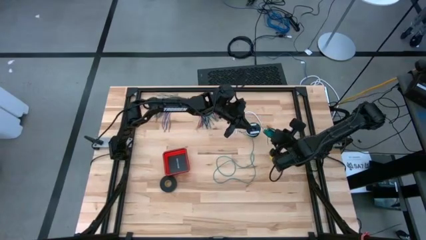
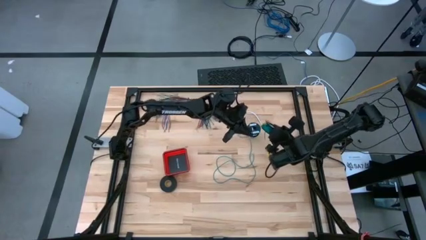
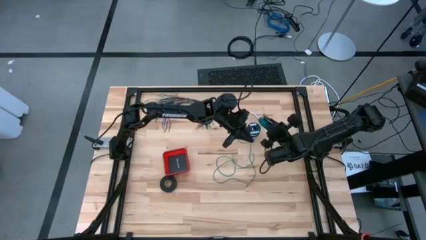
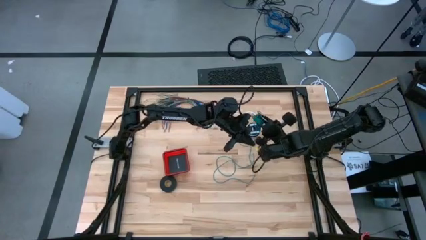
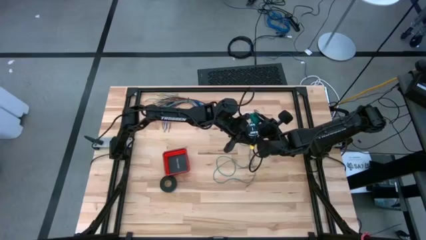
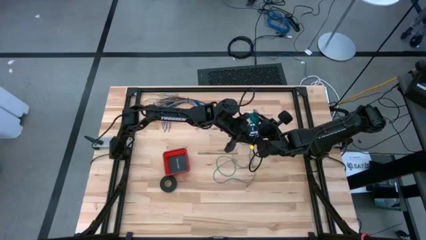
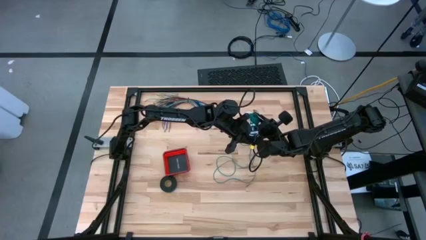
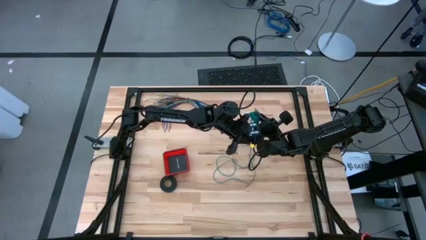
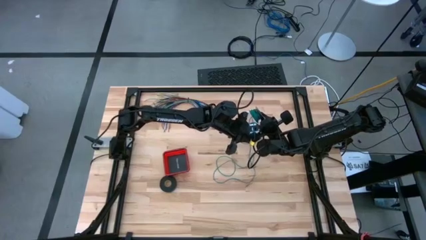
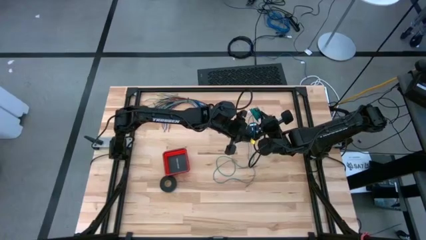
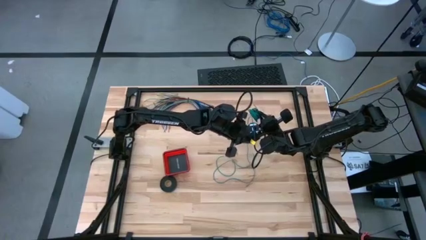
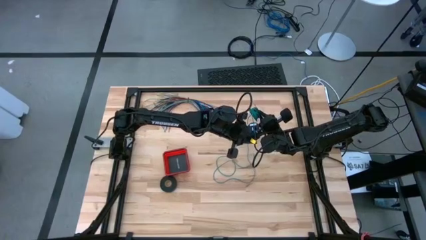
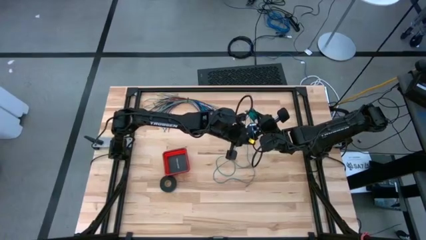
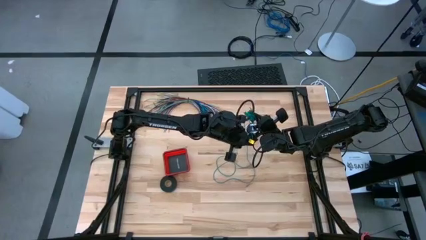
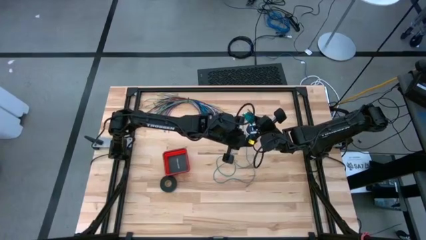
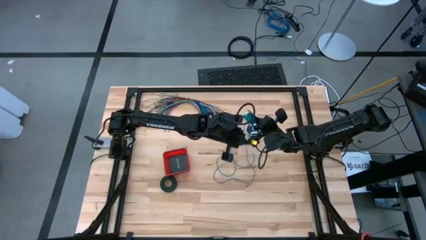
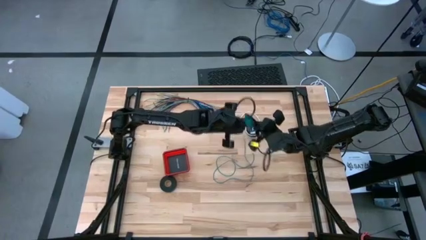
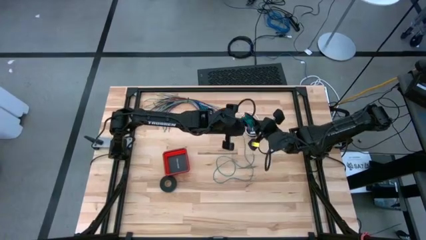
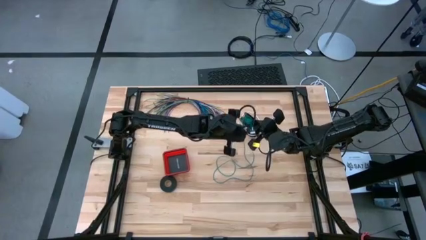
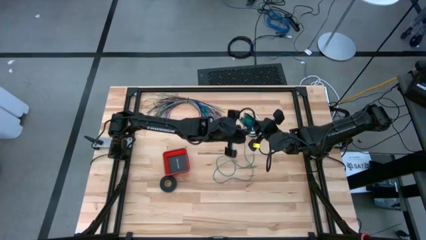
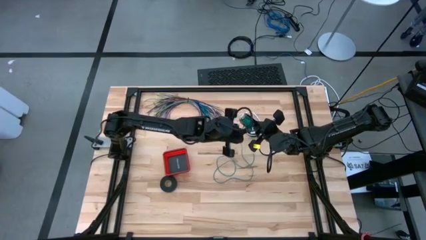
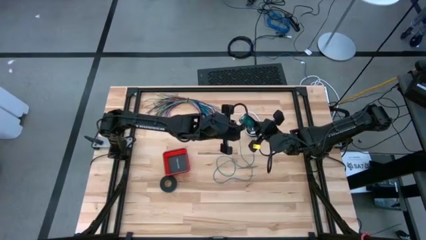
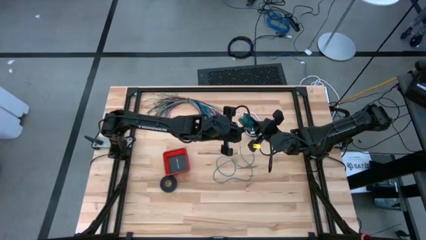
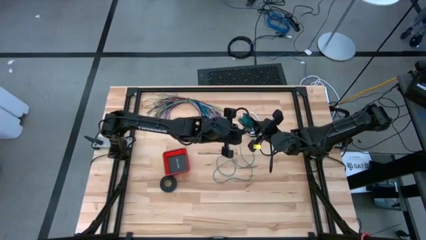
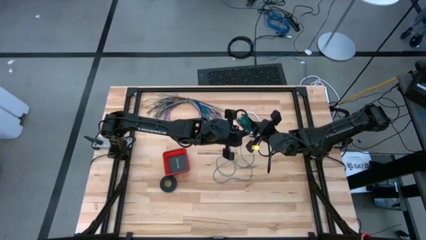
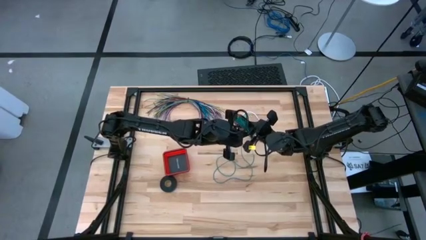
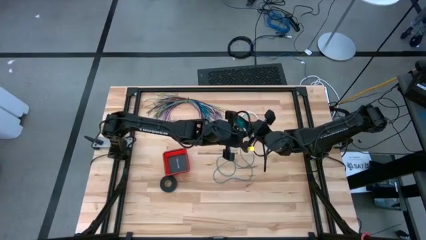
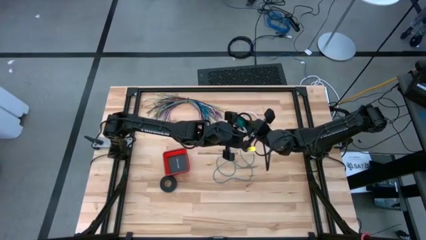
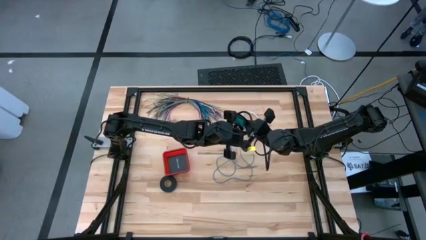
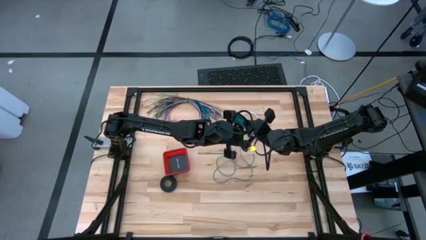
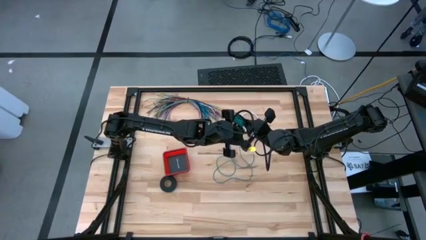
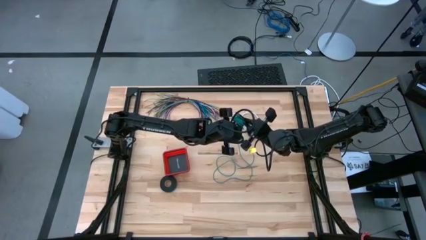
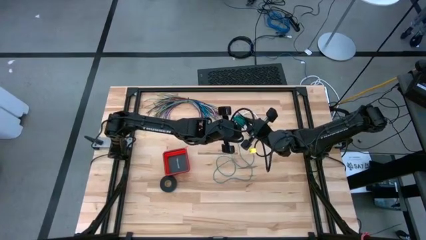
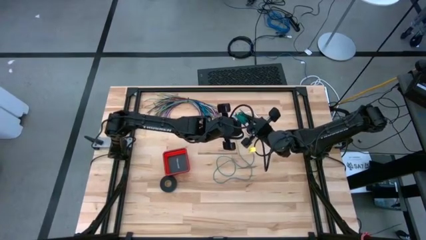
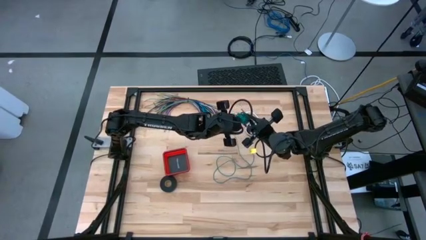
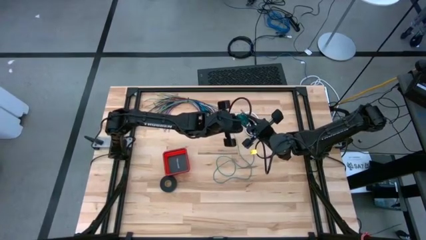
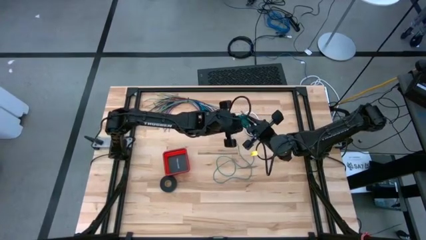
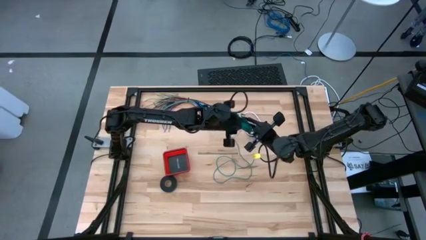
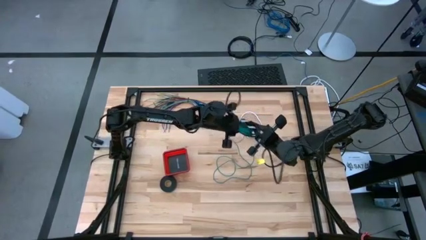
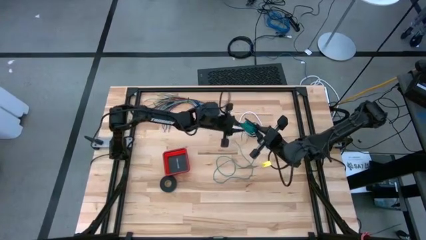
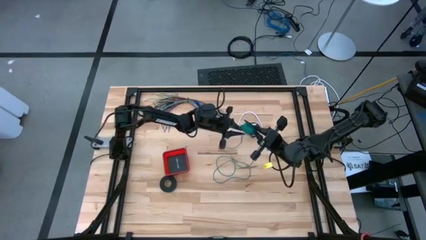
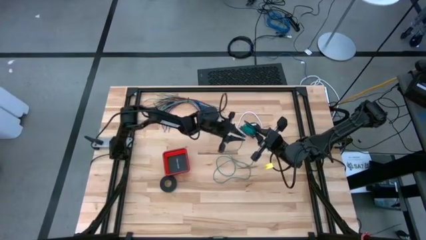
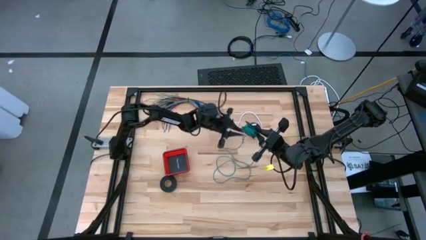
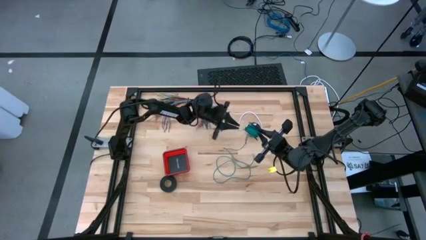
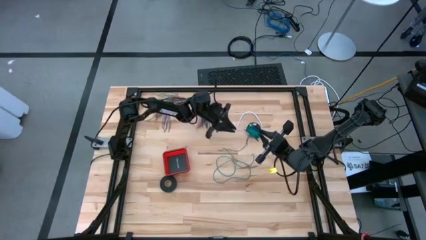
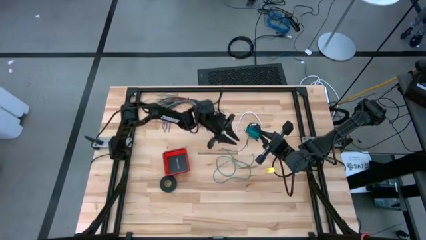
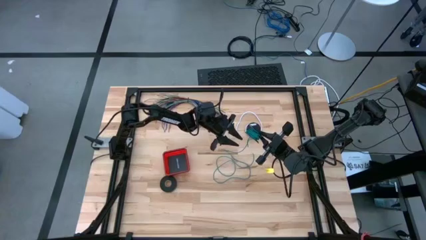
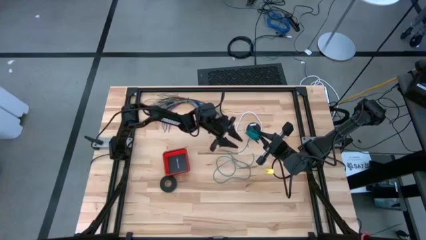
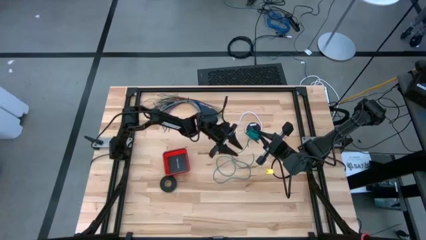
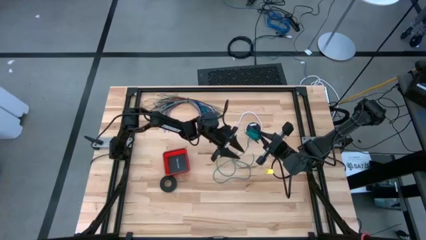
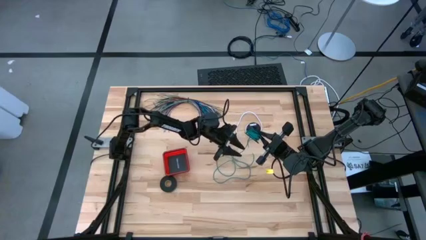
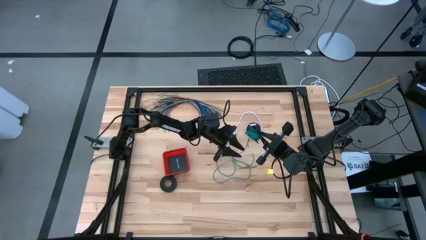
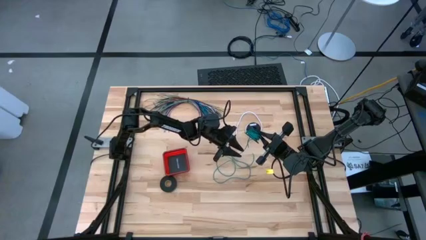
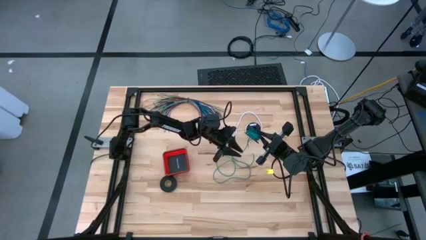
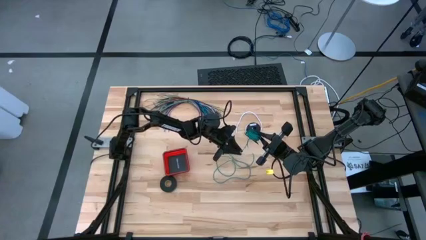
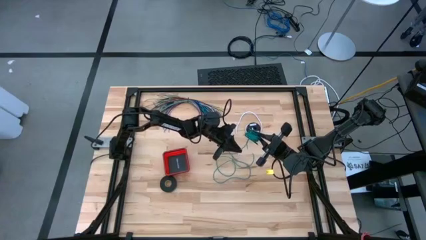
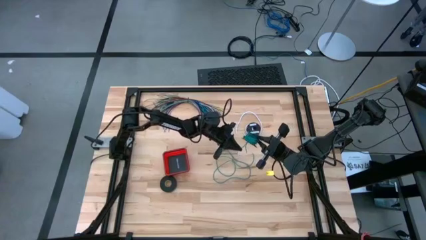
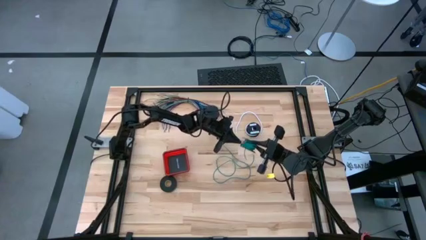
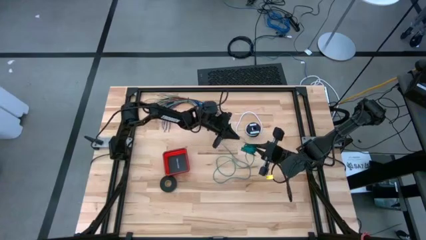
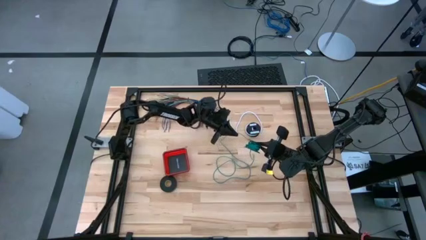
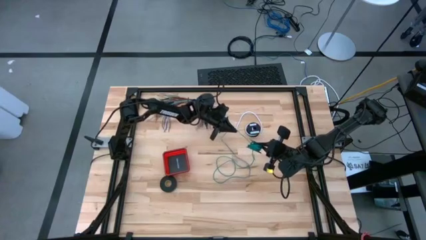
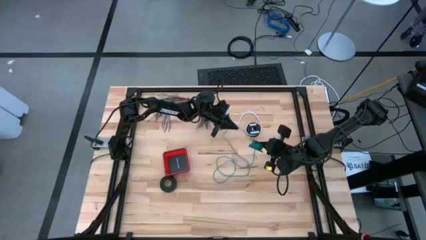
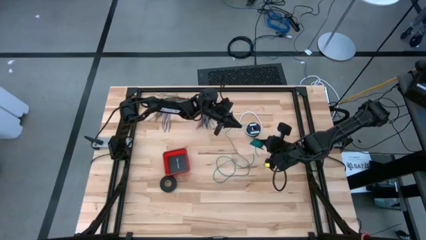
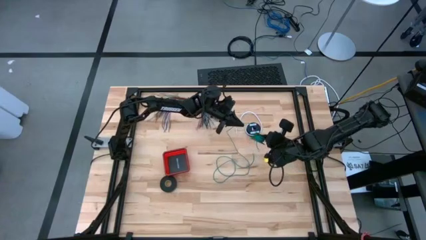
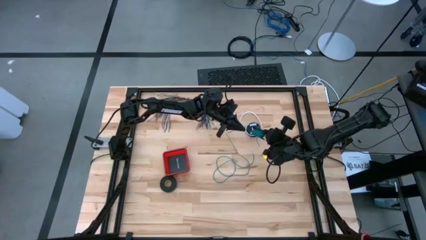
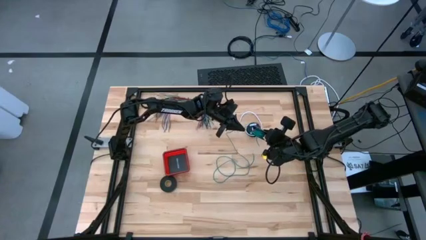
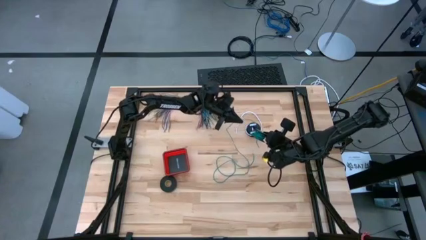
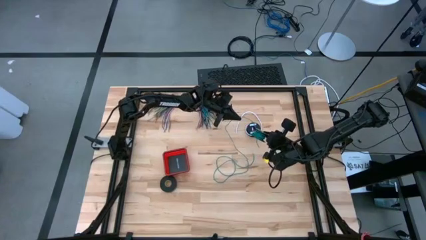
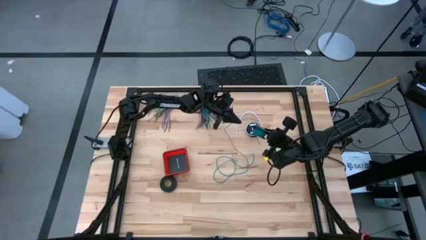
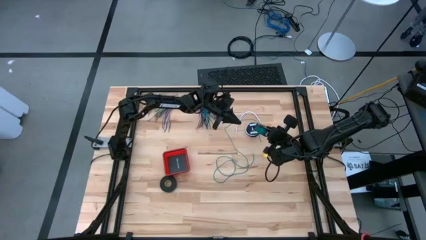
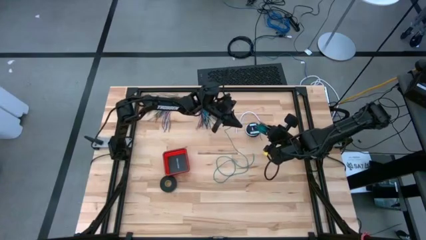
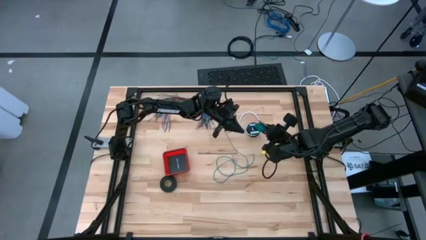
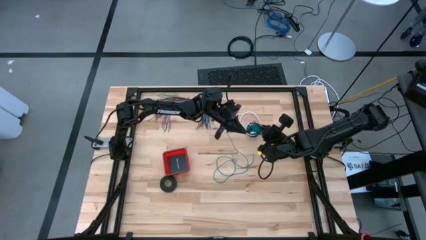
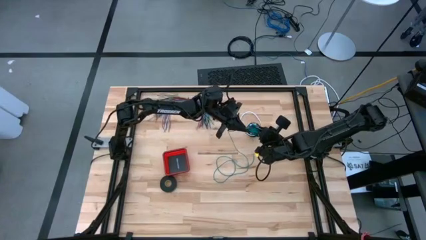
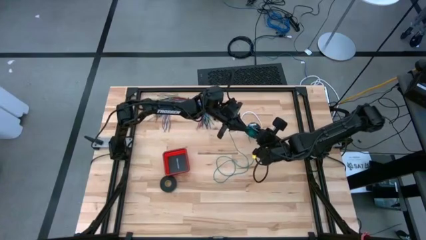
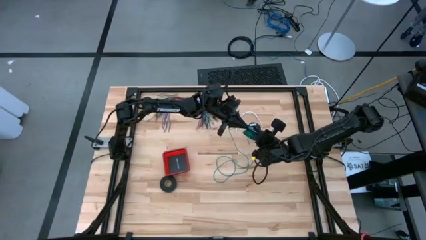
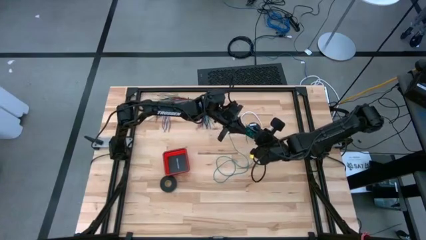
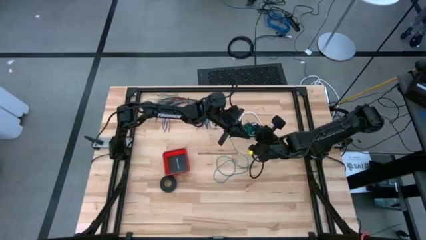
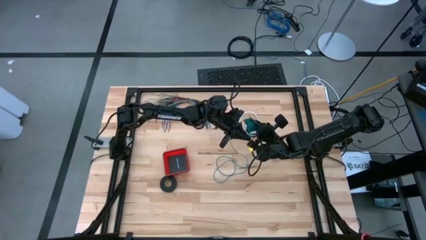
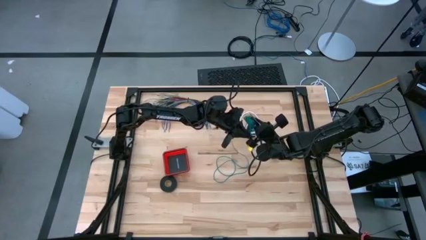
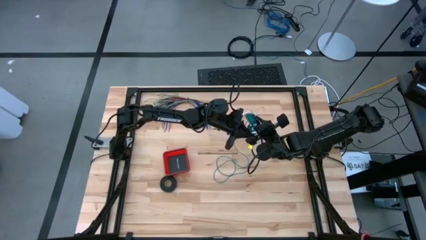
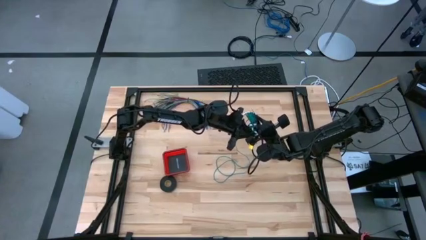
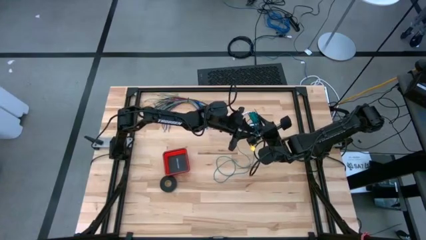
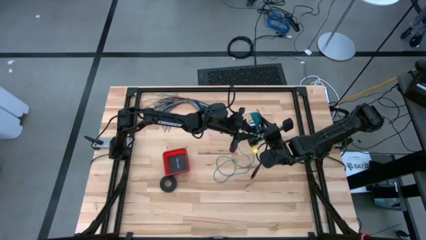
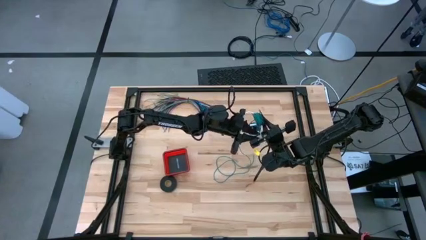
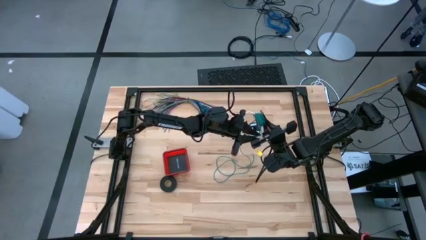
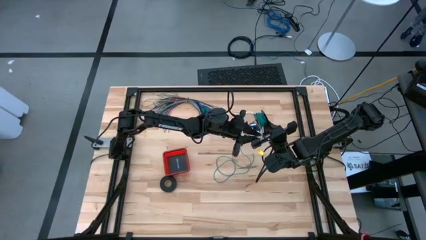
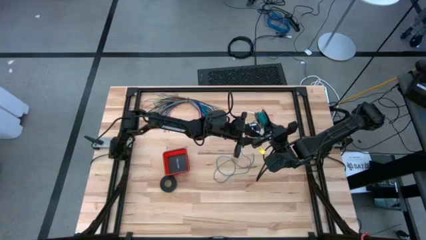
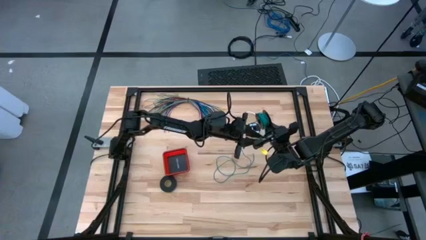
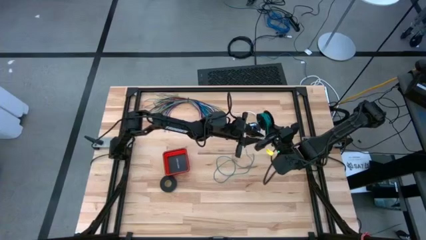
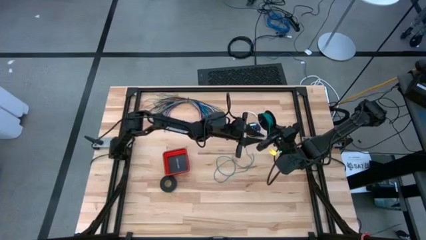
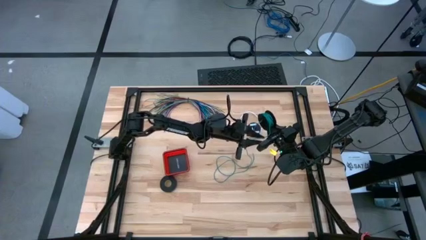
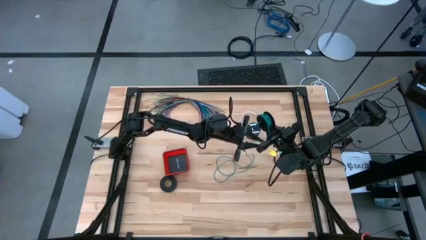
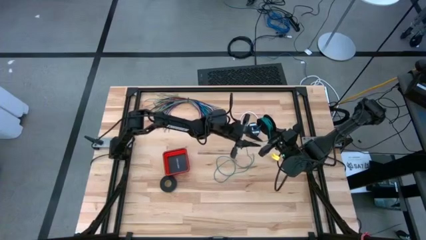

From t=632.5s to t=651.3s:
Task: Coil cords
Coil the green wire onto the spool
